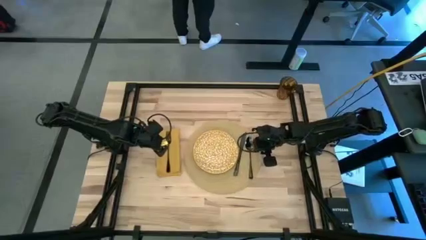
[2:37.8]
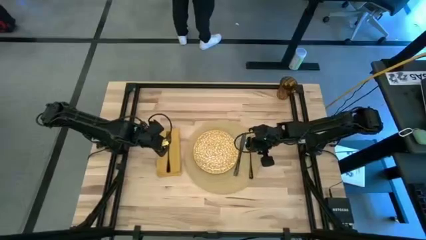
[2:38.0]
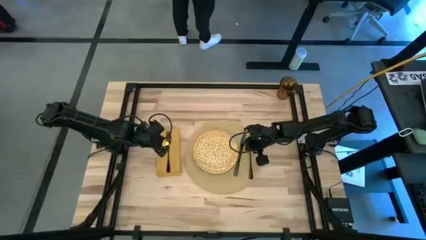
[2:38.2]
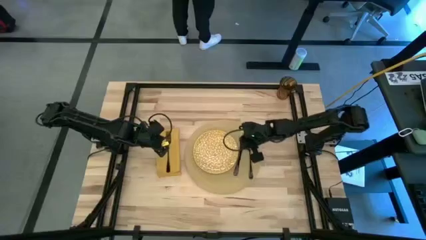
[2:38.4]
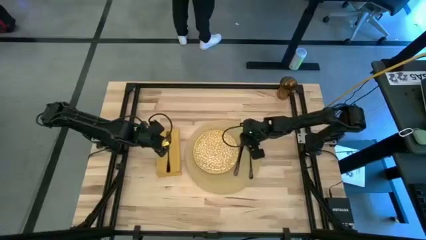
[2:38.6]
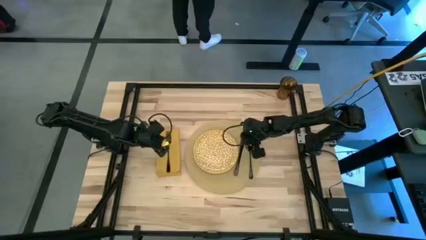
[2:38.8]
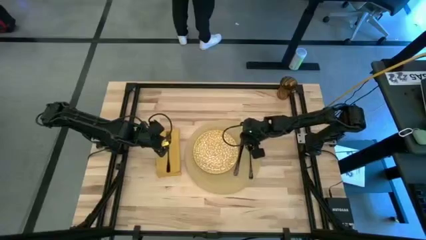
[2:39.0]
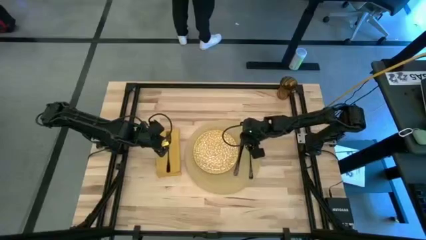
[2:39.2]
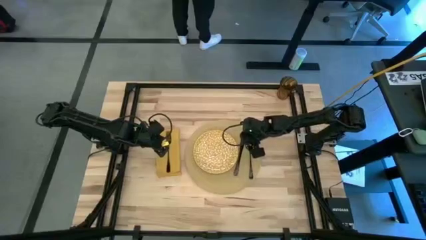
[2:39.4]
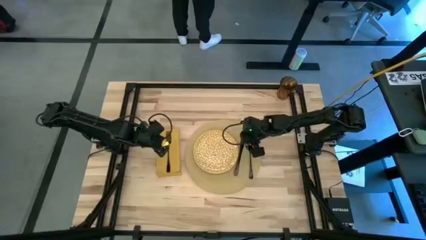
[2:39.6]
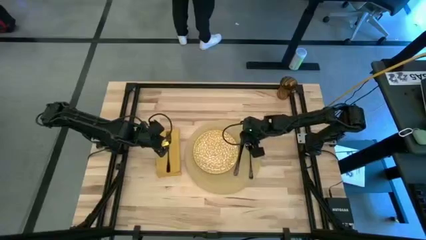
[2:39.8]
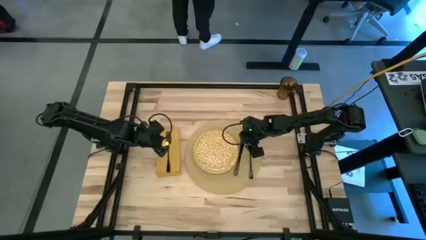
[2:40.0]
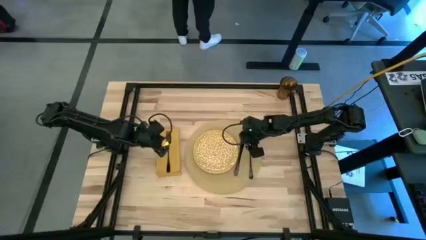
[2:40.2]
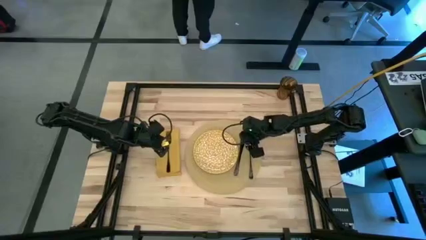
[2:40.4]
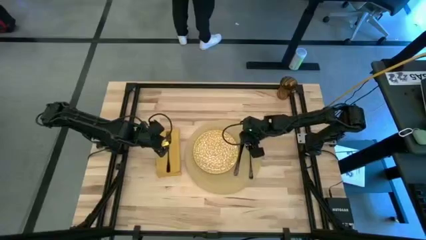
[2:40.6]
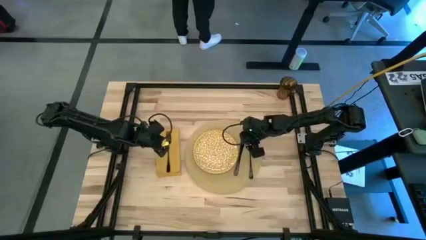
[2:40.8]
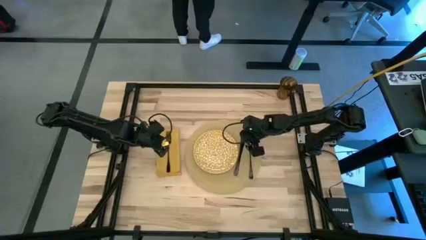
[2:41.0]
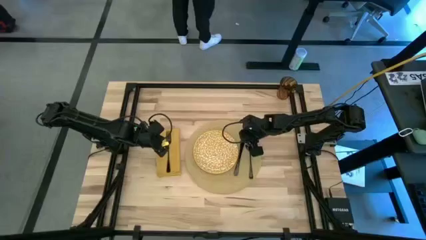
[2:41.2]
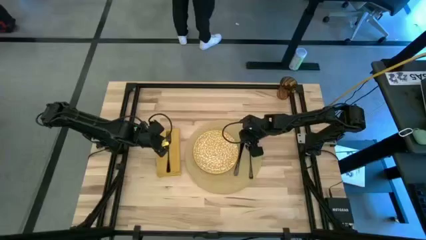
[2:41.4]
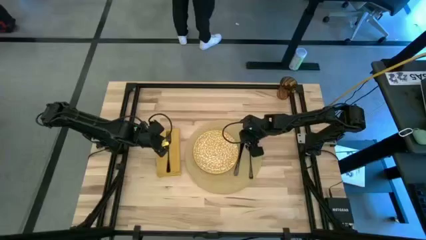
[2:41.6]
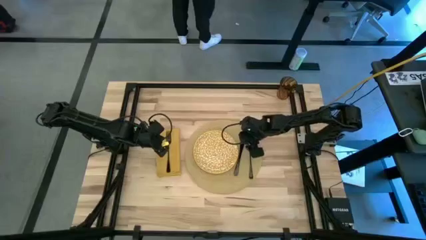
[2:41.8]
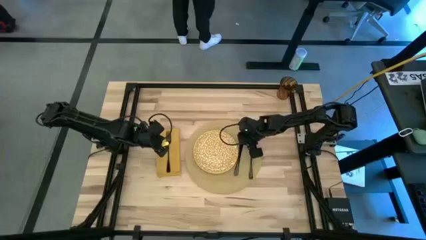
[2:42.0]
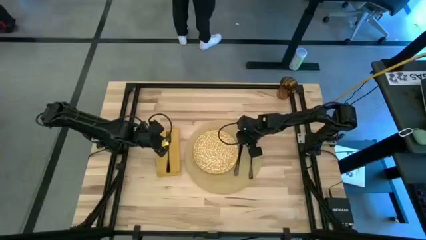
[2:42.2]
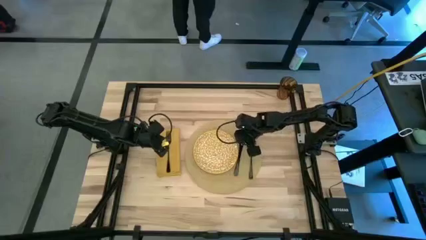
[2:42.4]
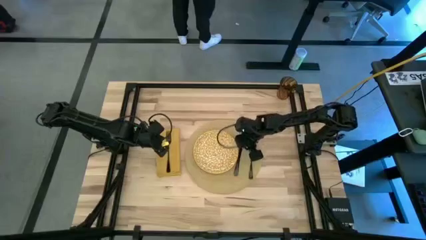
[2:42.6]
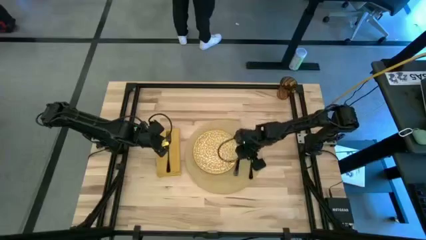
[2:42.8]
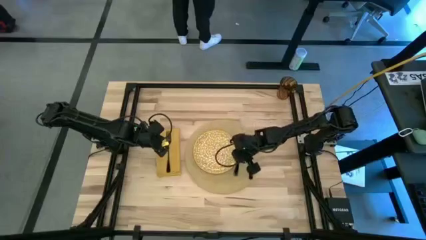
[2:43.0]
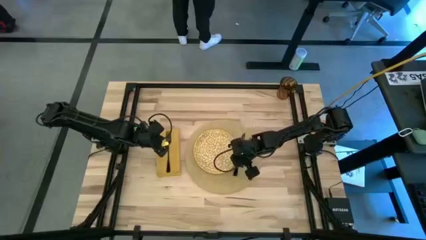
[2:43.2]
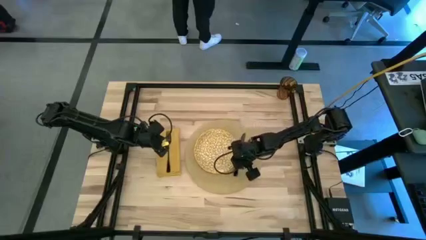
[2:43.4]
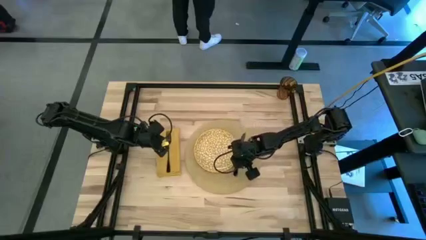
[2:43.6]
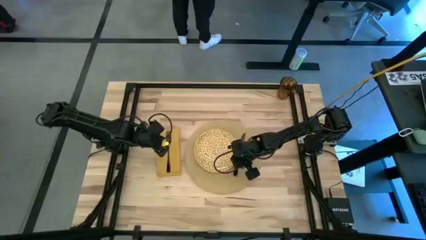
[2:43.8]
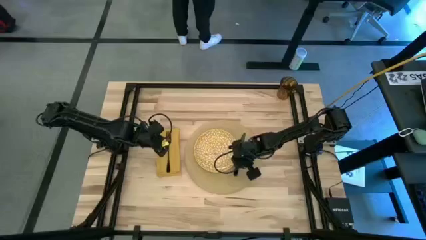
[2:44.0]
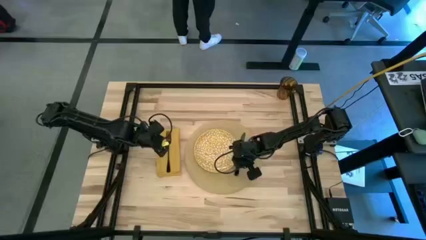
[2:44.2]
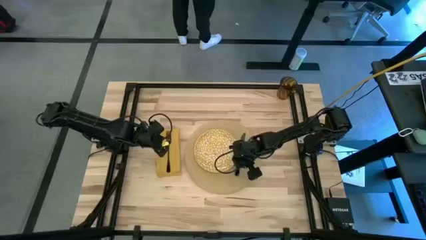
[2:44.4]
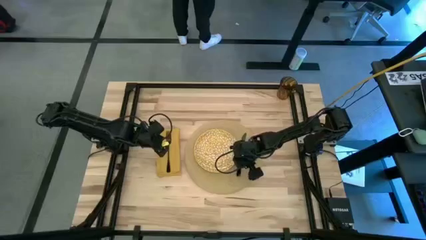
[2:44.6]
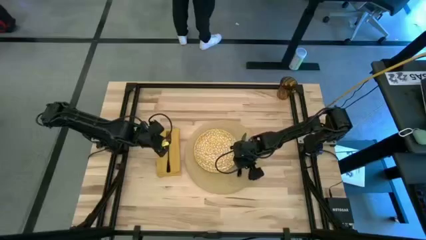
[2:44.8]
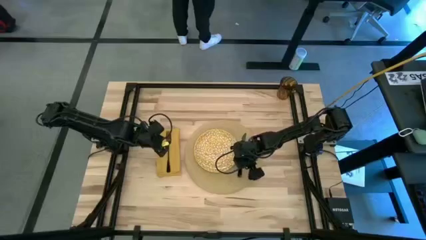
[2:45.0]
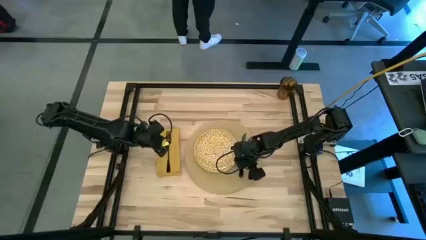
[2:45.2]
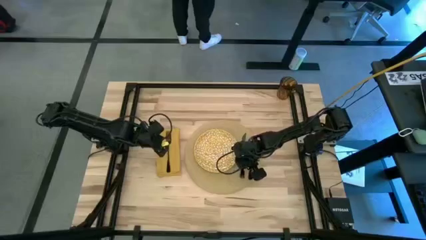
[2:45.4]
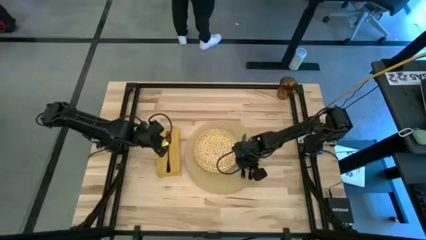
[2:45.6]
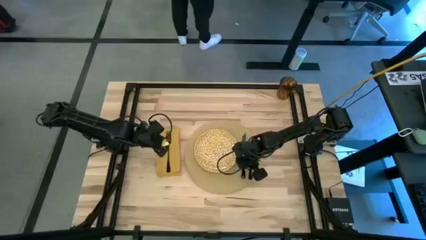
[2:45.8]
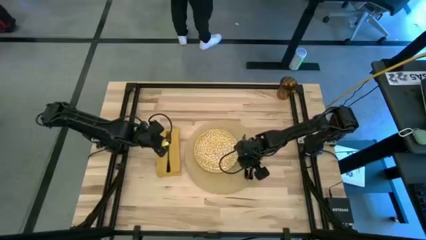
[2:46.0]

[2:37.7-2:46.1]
Task: Set table place
Adjust the black table knife on the yellow placemat

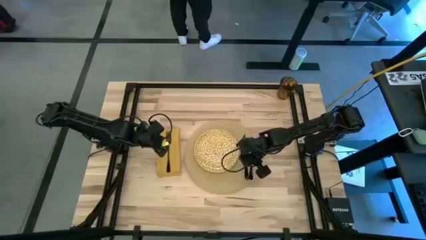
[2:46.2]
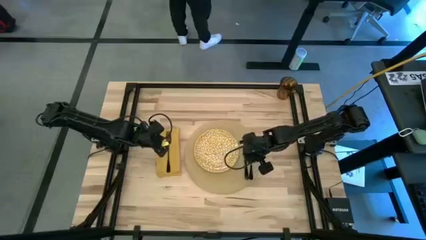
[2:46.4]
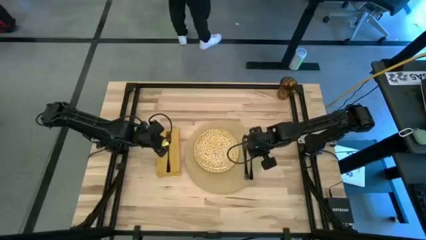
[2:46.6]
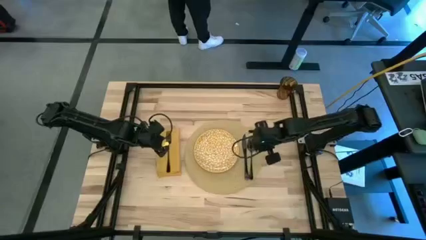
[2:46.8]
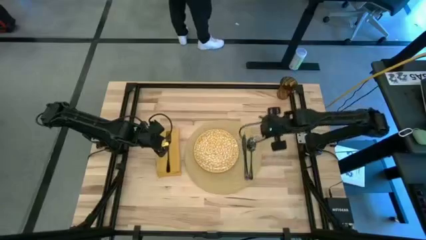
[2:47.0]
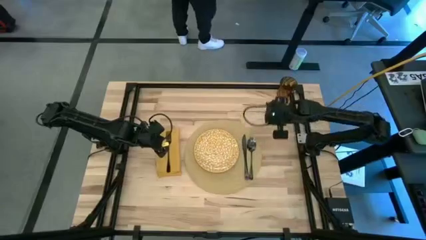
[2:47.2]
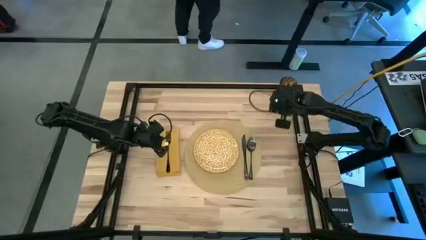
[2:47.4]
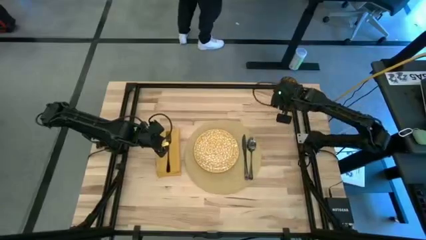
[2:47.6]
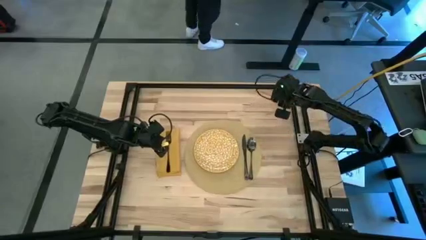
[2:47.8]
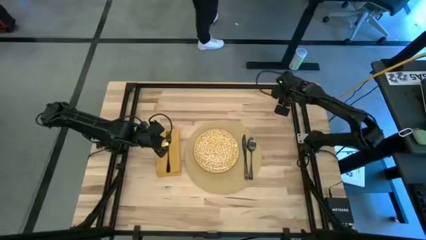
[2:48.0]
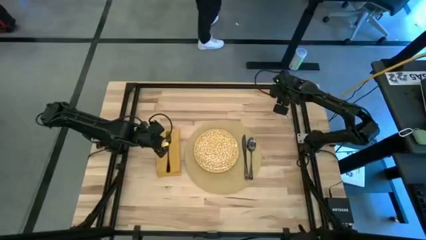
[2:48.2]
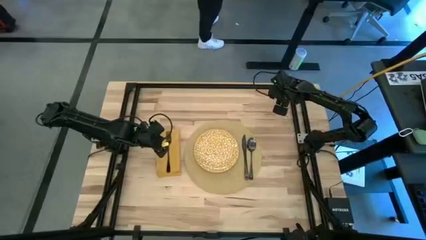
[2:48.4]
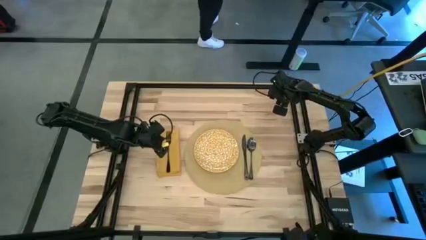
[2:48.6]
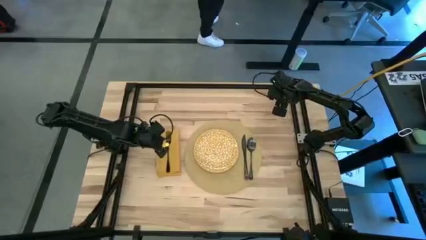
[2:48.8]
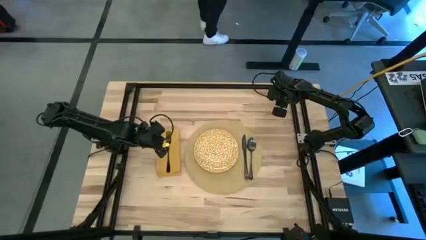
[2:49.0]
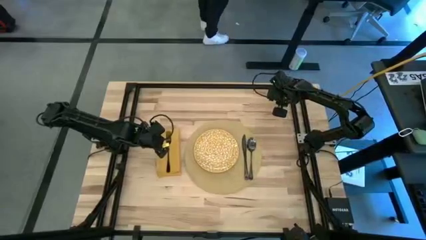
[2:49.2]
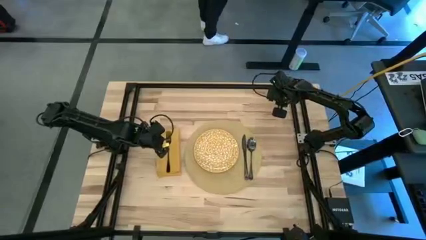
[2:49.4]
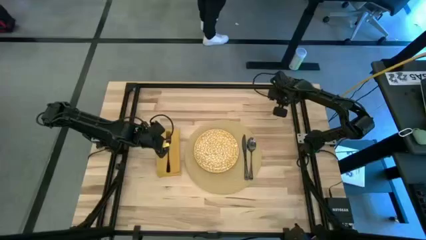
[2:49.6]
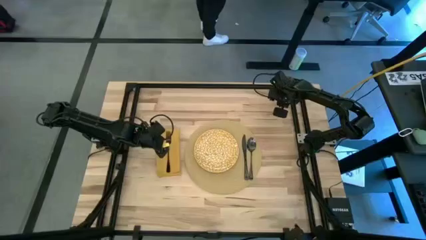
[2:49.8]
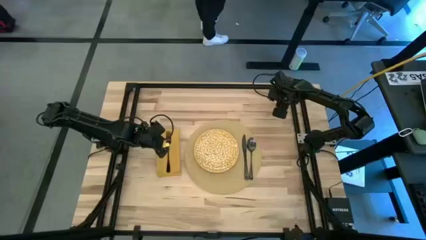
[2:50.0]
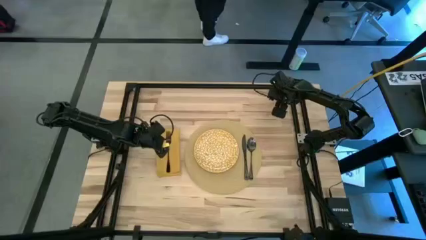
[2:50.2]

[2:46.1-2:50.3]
Move the brown glass to the top right of the yellow placemat

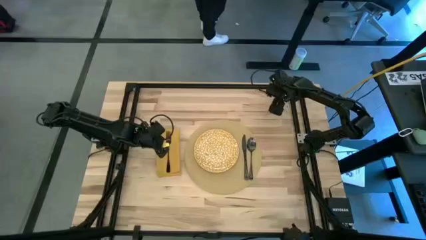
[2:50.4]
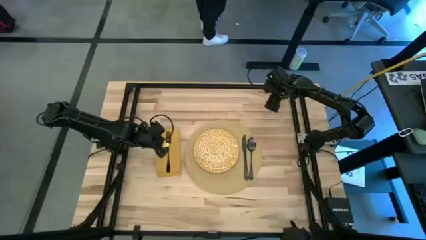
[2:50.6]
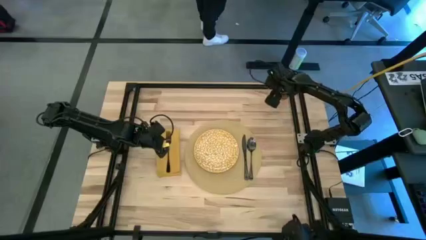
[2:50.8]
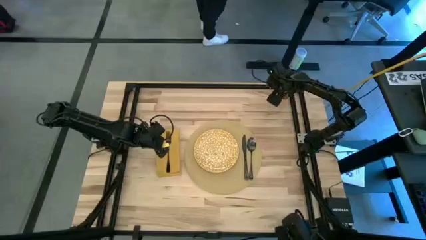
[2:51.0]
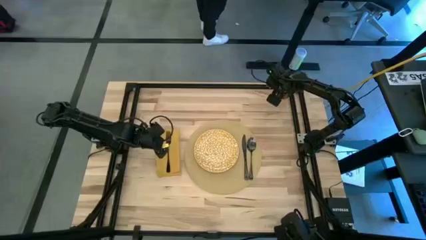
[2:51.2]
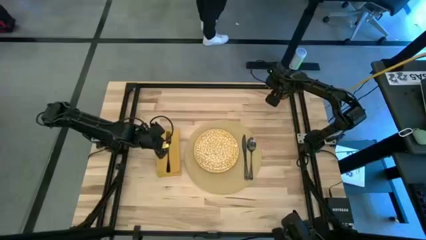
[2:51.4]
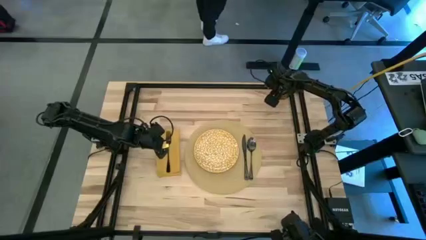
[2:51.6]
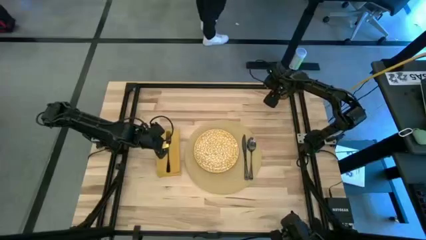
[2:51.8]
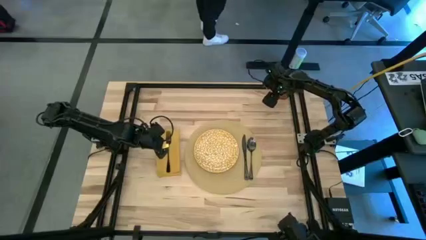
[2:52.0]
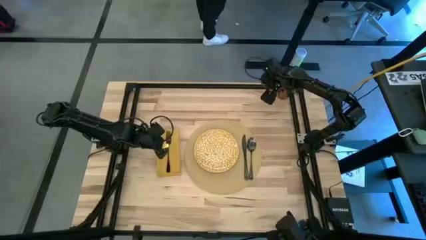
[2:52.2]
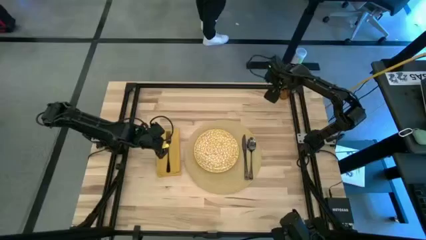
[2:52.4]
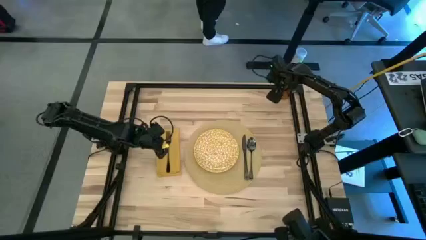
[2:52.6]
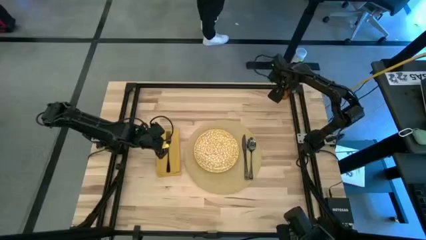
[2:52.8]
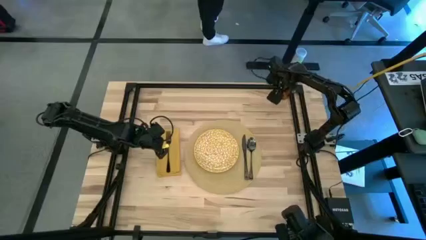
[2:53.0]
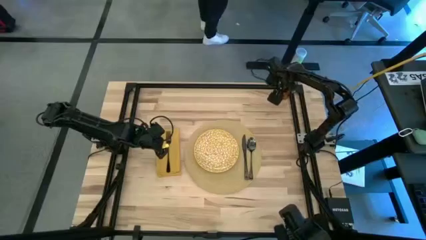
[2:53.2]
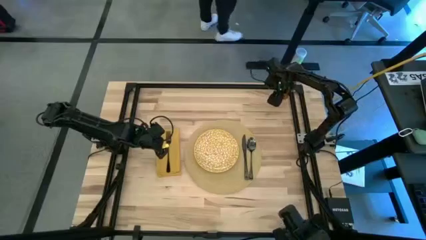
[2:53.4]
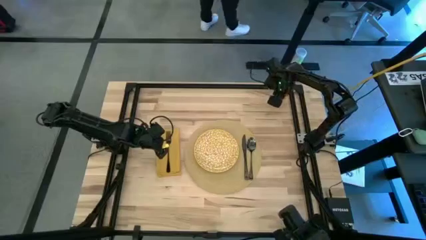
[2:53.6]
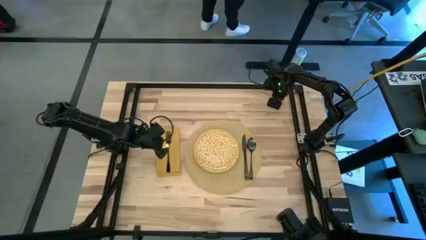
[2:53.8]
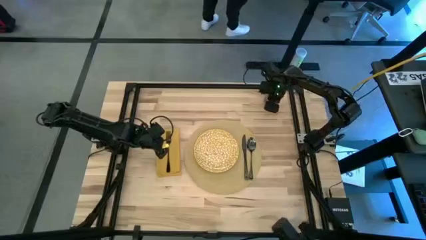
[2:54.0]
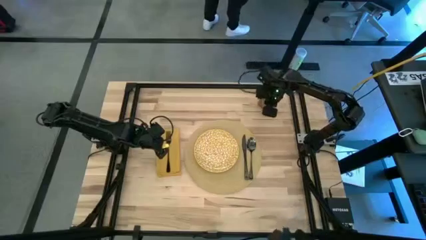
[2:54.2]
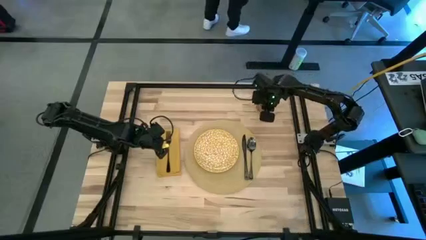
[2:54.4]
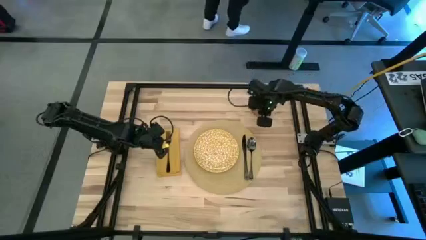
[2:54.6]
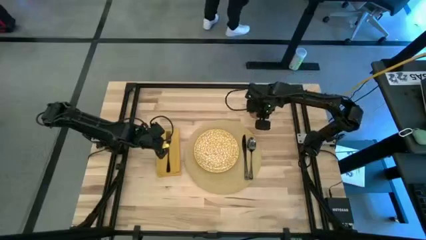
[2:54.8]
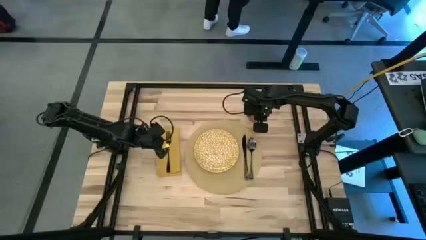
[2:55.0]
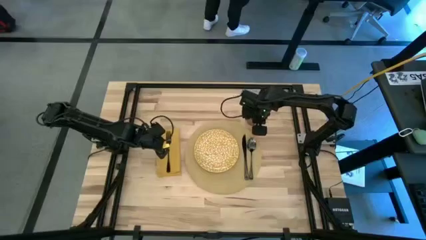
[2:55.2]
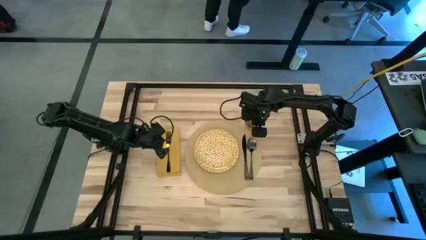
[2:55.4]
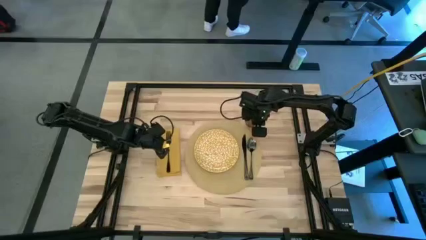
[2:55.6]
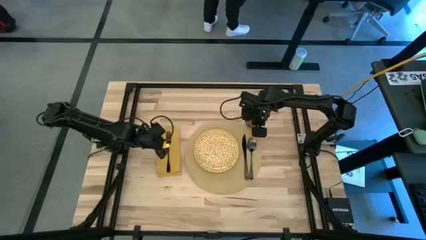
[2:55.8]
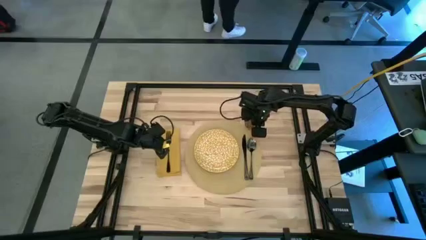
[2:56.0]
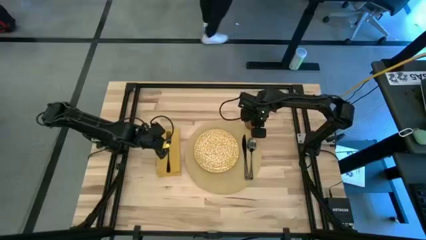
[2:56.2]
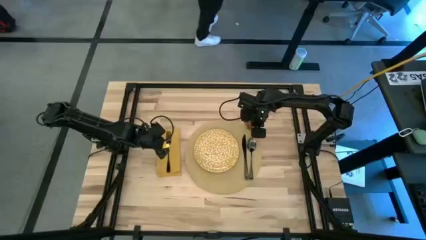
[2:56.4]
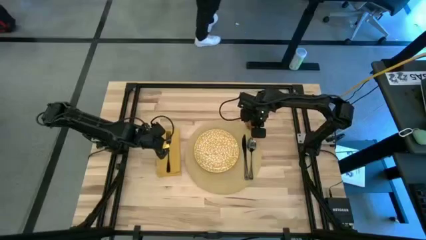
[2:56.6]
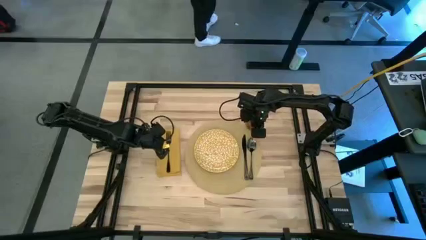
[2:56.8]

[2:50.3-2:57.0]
Move the brown glass to the top right of the yellow placemat
